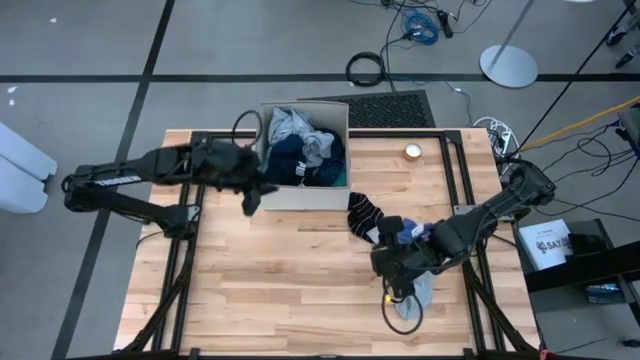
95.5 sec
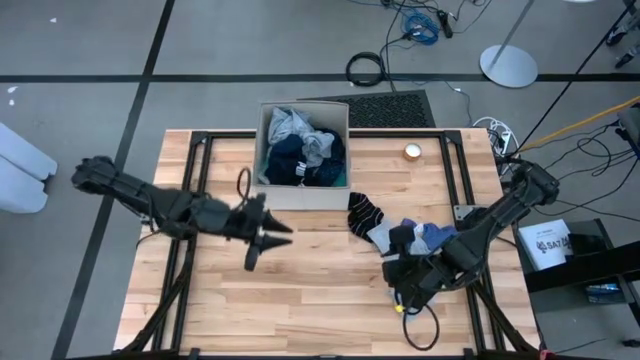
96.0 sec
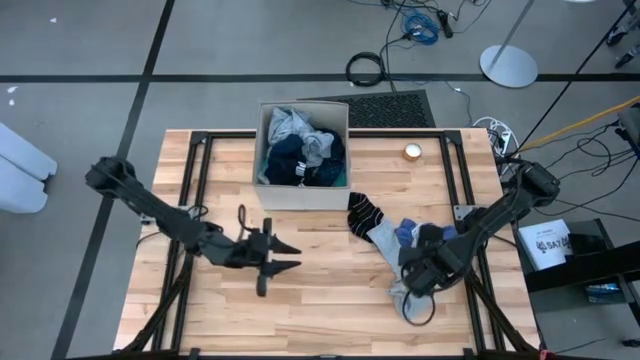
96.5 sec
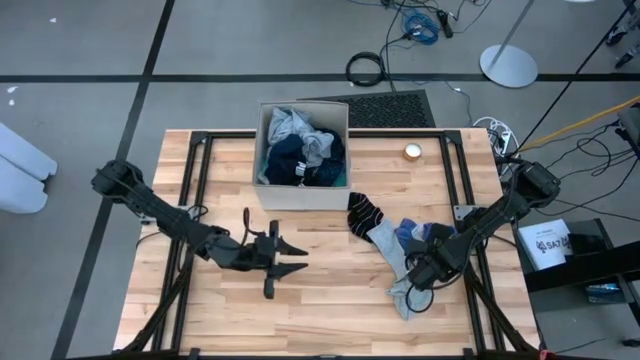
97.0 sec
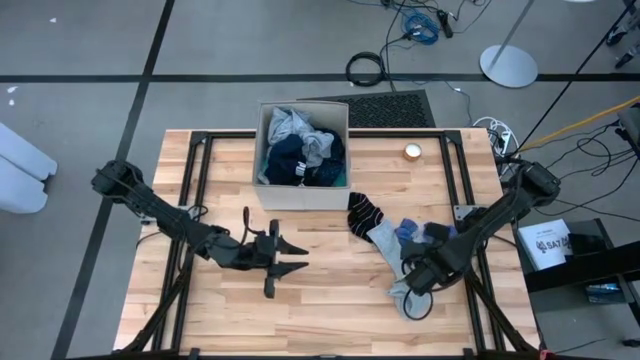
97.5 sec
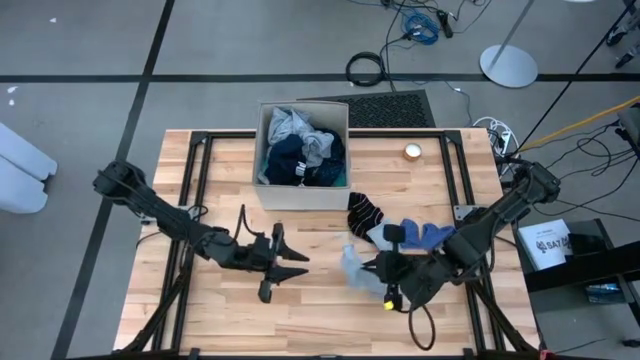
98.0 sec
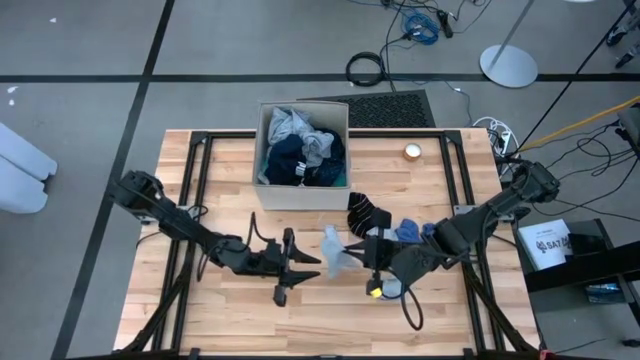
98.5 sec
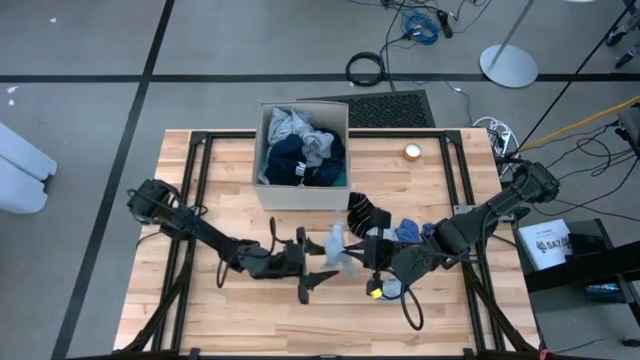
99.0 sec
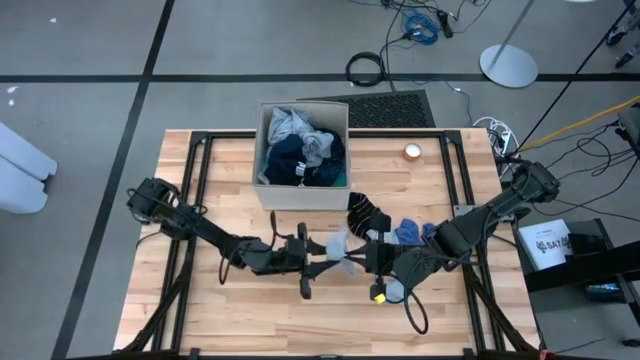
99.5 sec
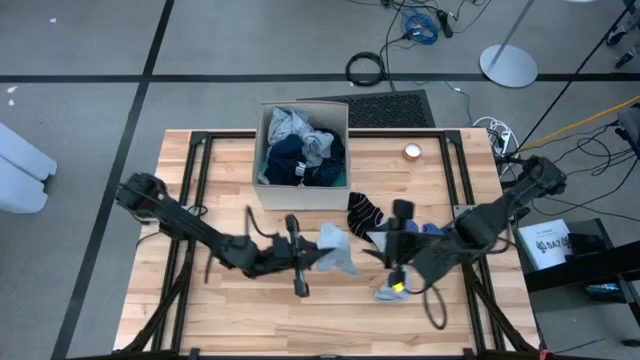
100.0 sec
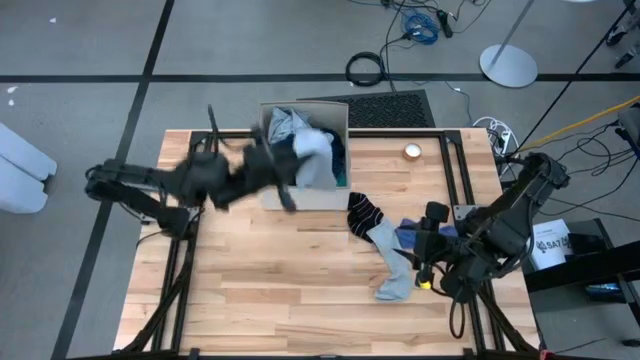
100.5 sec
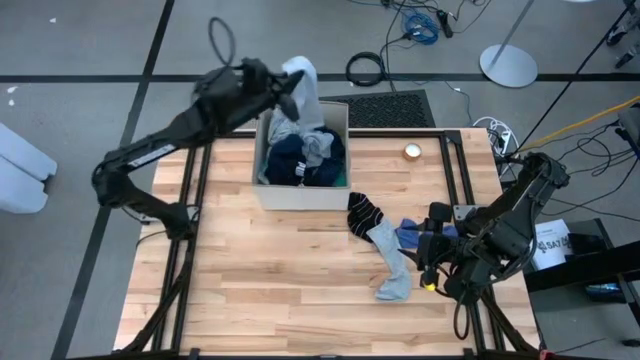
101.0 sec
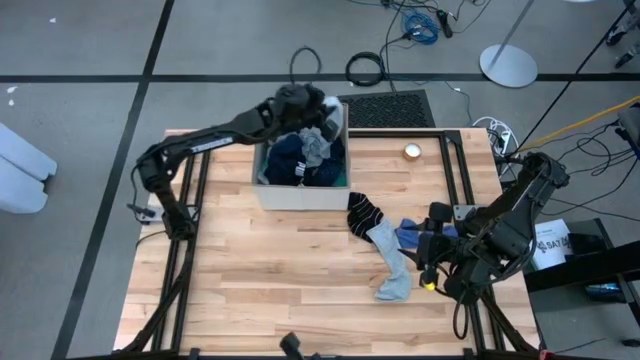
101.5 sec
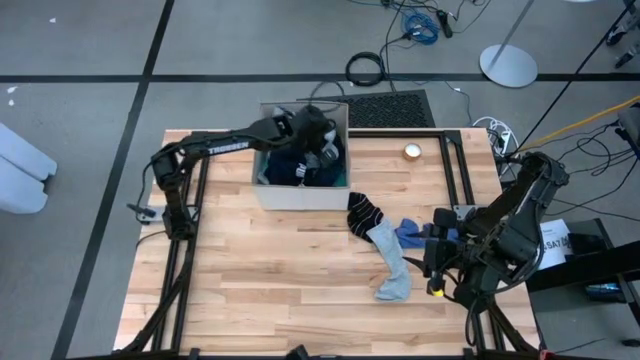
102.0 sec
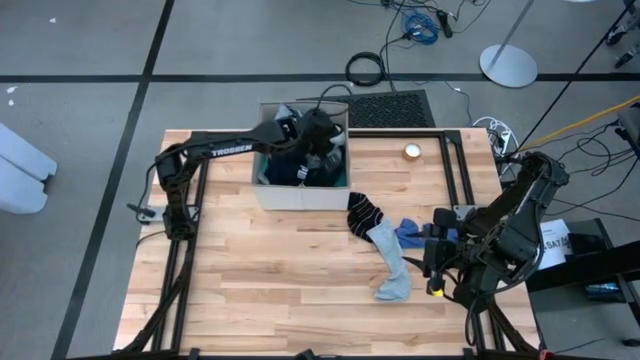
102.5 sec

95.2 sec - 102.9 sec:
Task: Sort clothes
Put the gray sock into the white laundry organizer

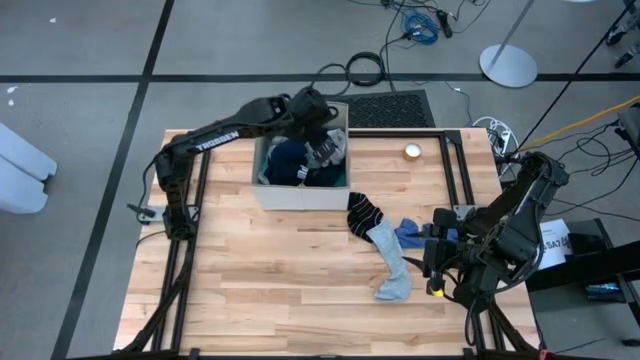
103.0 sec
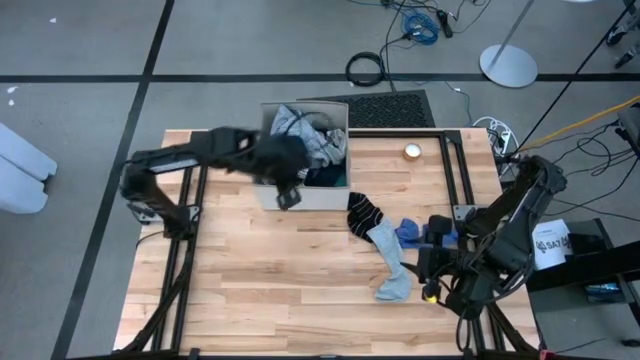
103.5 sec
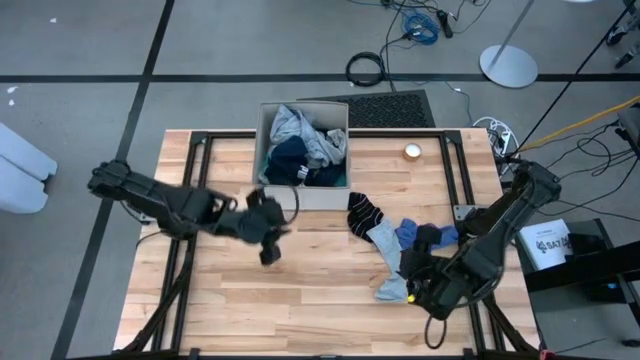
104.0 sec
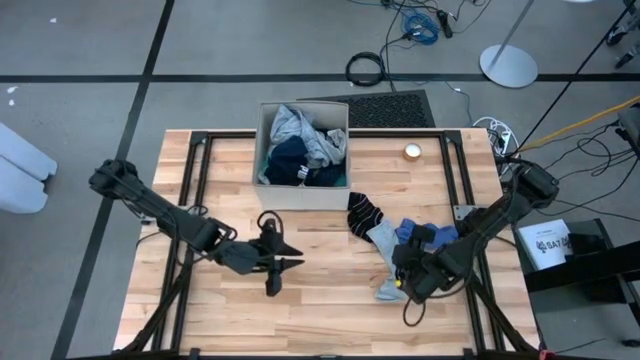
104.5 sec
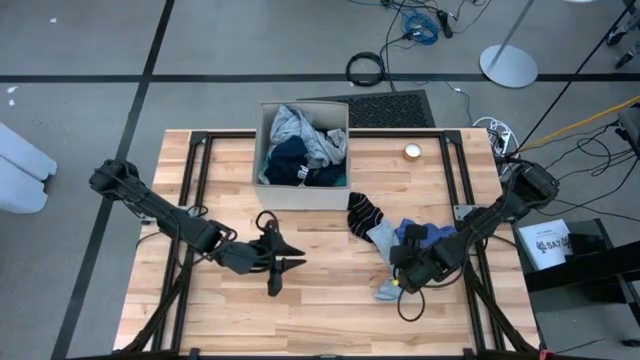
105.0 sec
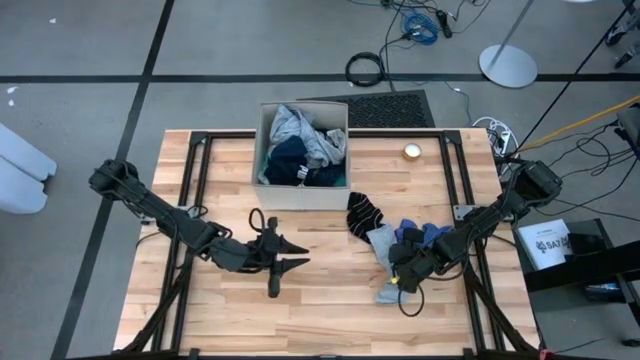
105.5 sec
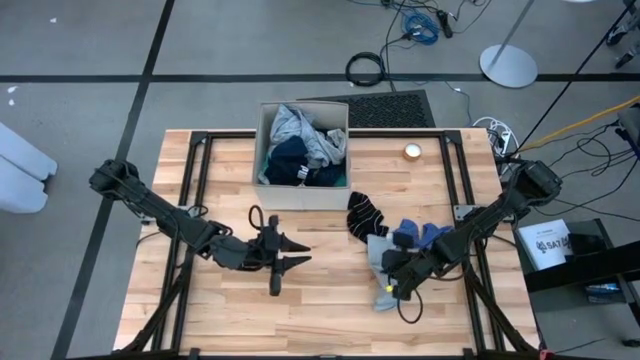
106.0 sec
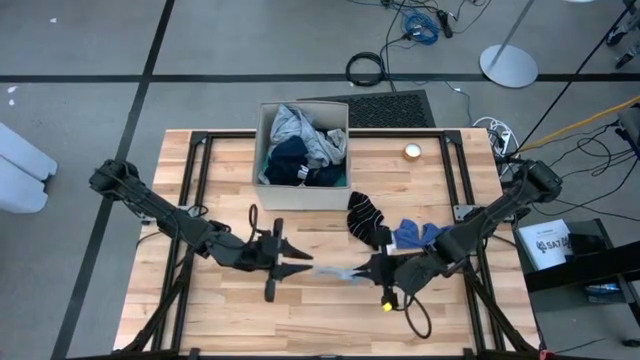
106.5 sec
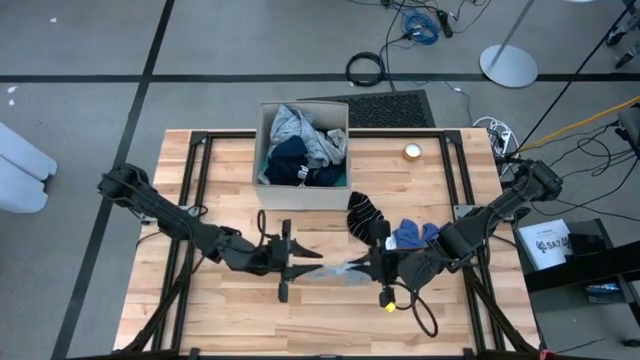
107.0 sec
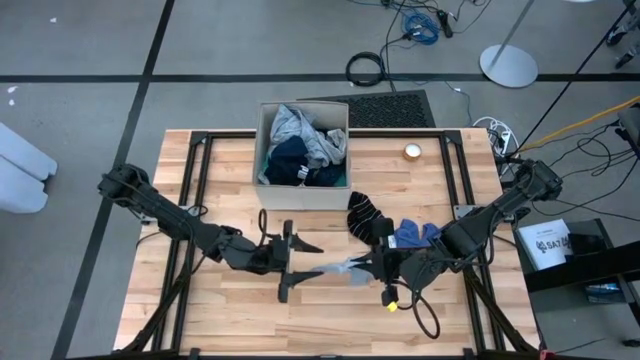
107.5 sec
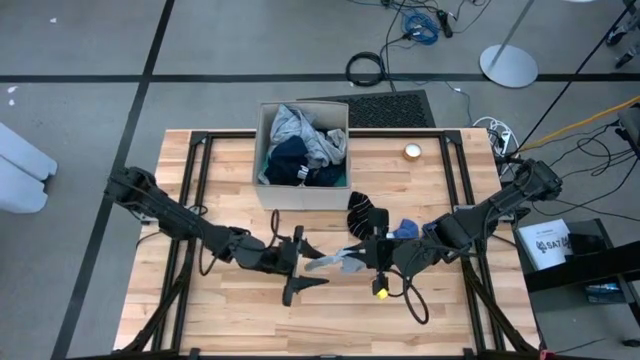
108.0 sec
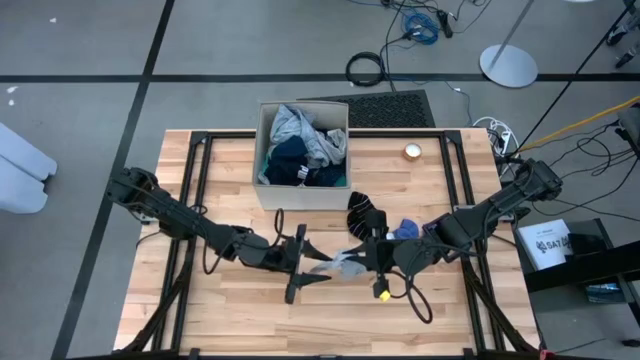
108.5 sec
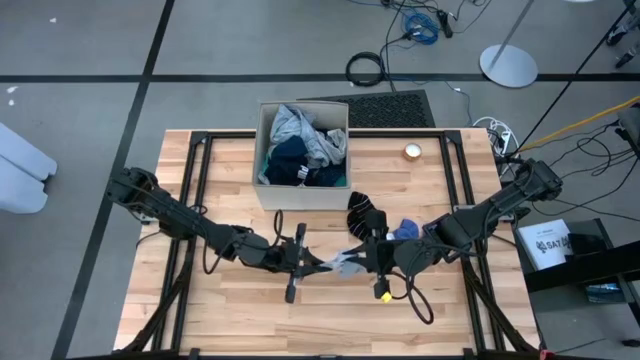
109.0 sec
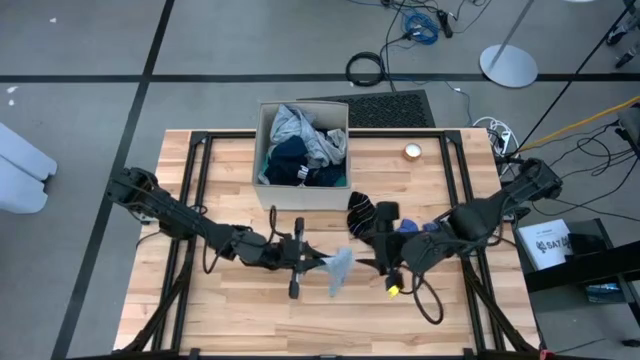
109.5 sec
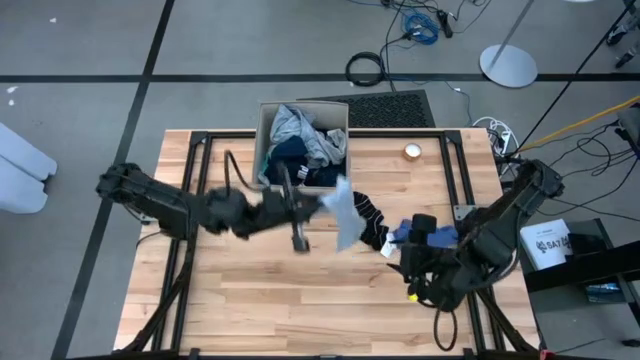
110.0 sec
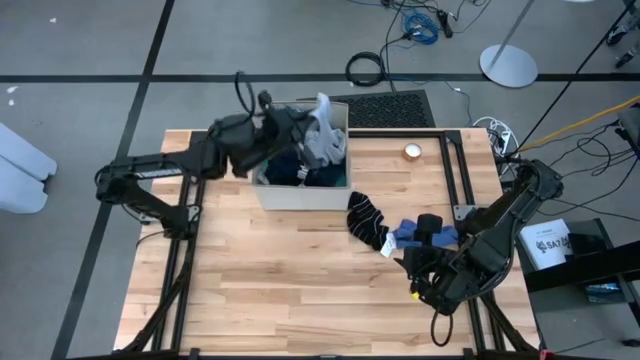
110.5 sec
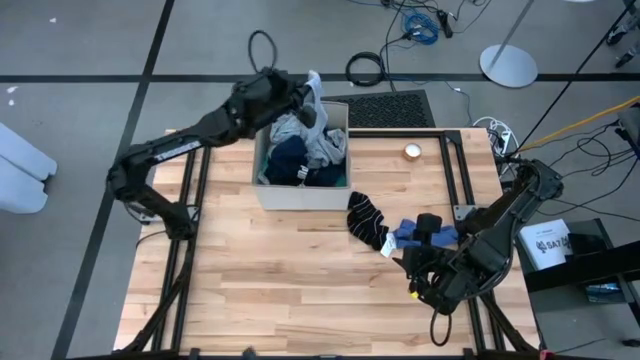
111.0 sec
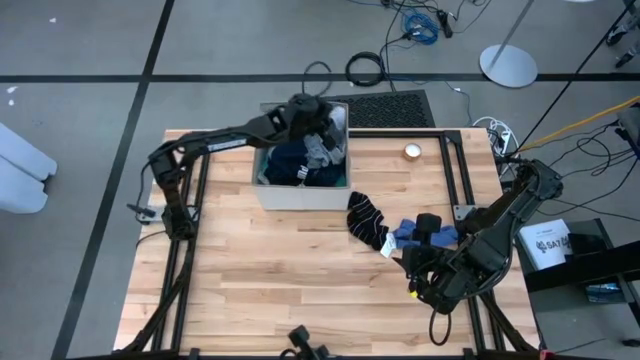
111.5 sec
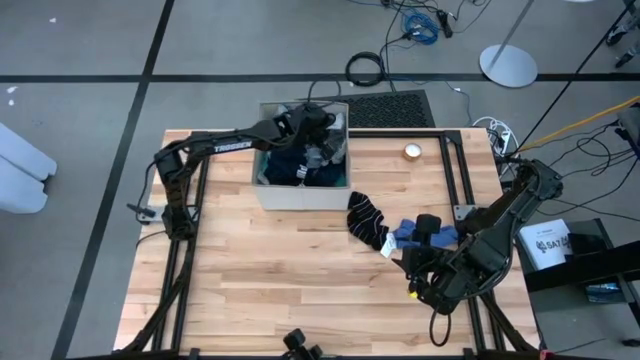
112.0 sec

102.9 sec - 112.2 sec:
Put the gray sock into the white laundry organizer

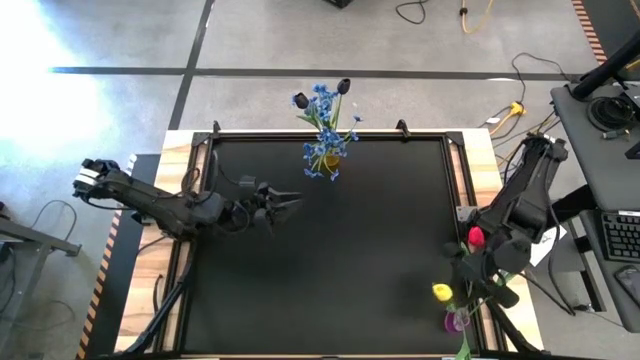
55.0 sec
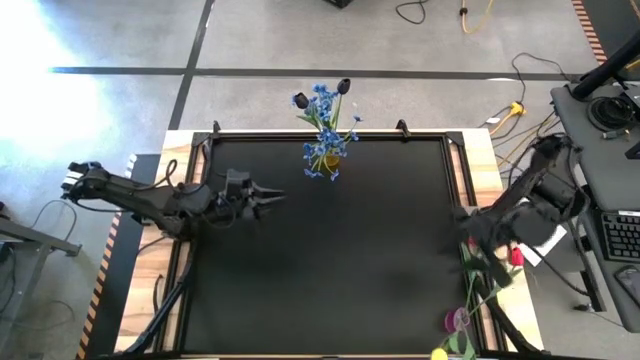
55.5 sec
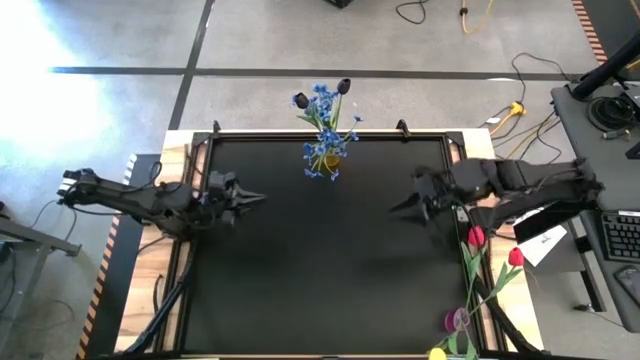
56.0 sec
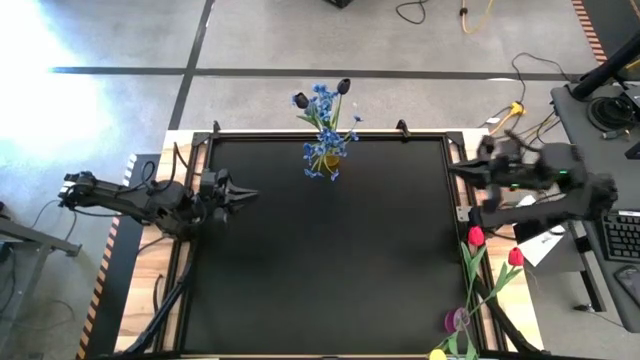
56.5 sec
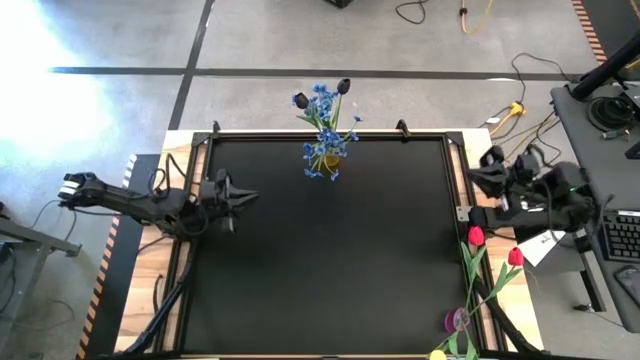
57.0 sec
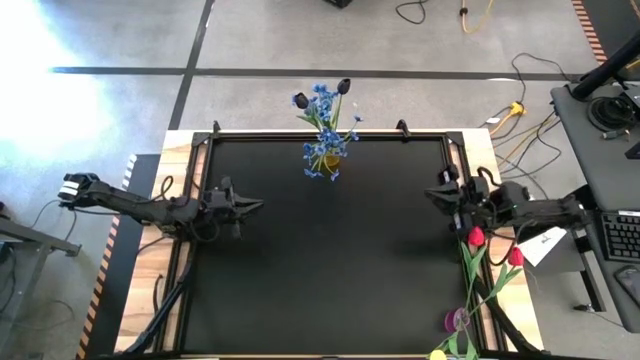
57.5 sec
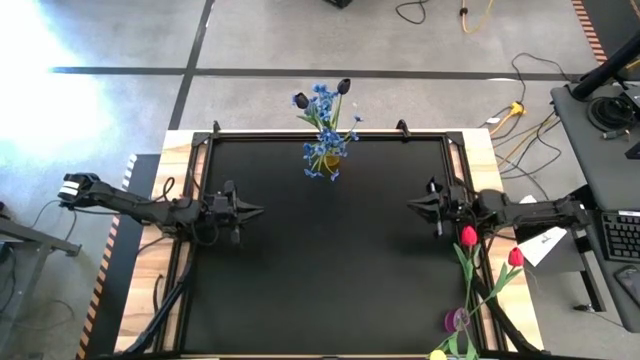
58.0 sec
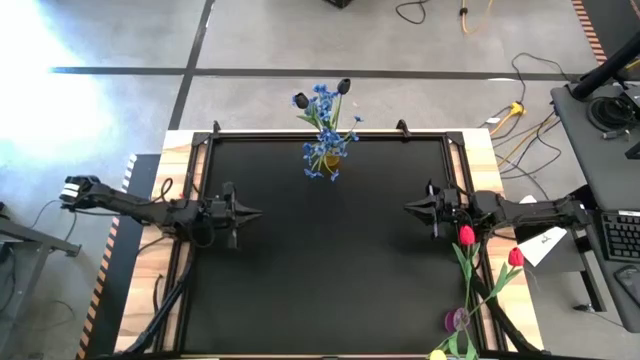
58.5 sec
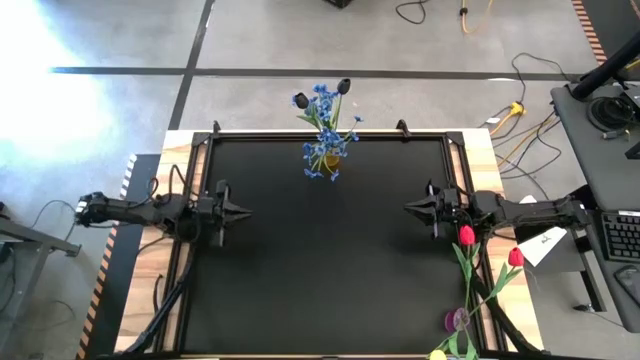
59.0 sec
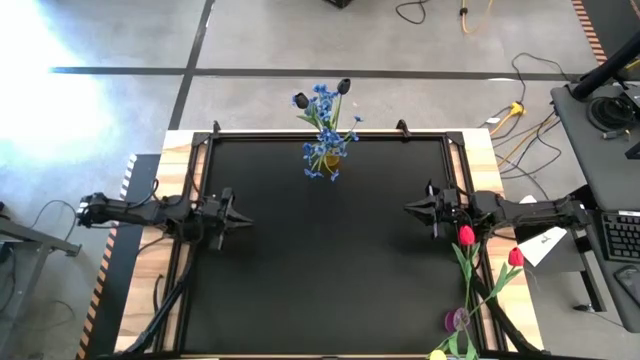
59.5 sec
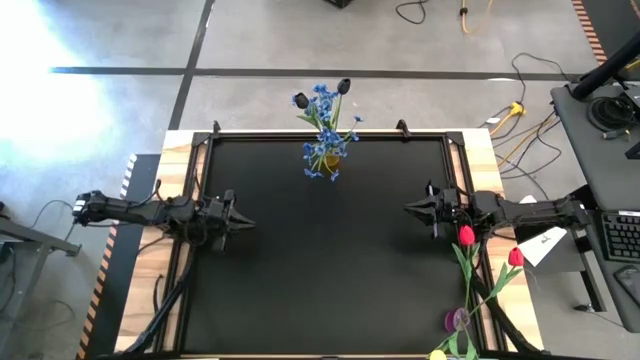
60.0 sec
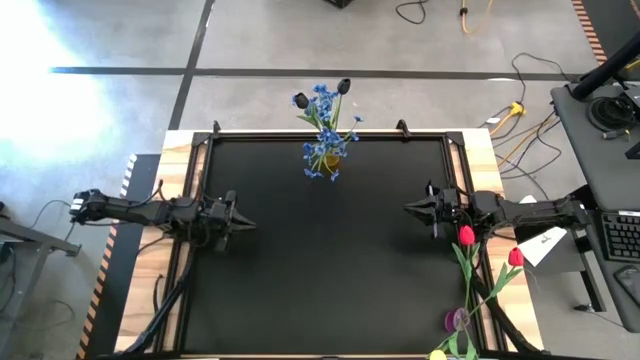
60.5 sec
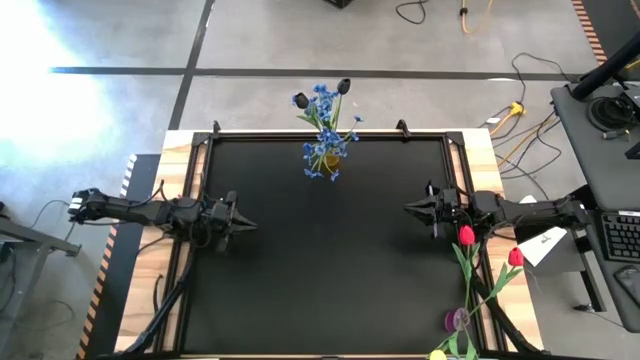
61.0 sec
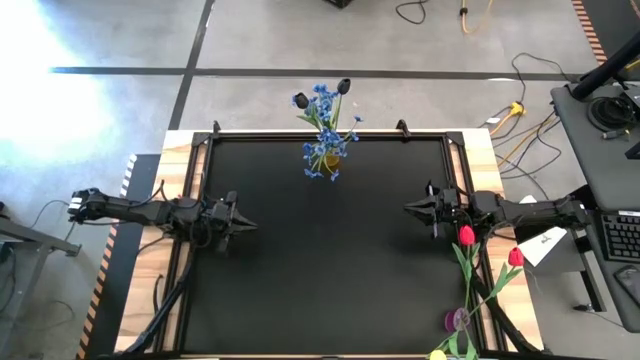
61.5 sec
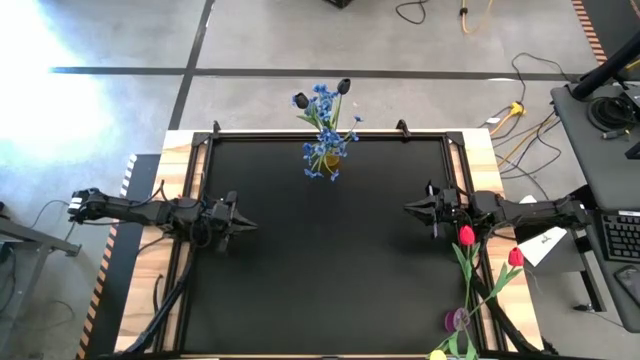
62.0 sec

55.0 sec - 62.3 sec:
Task: Sort flowers into vase by color
Return to Home Position
